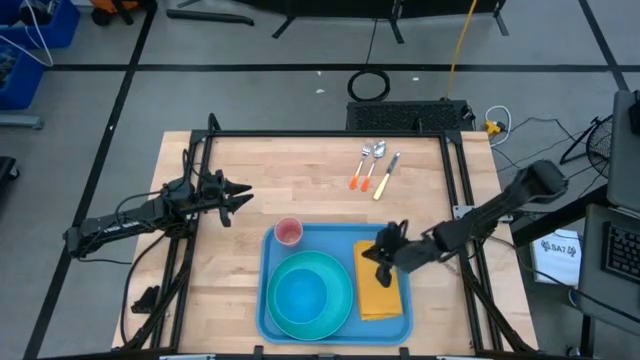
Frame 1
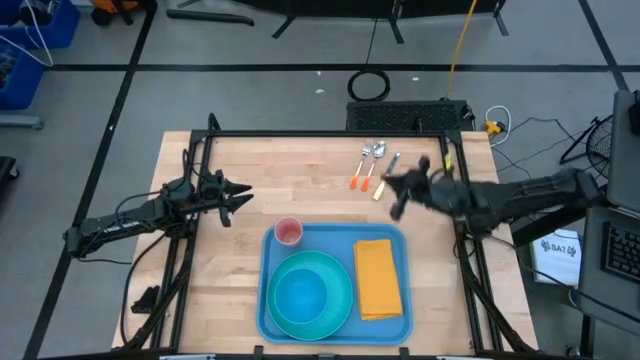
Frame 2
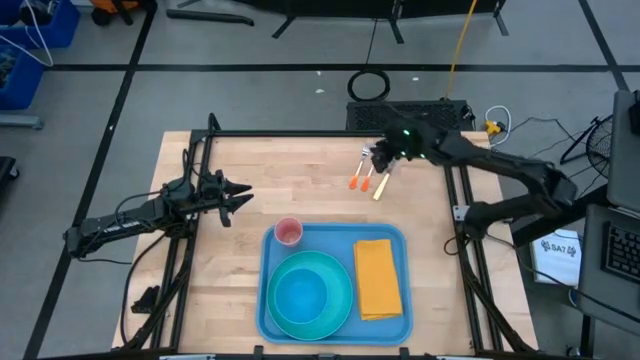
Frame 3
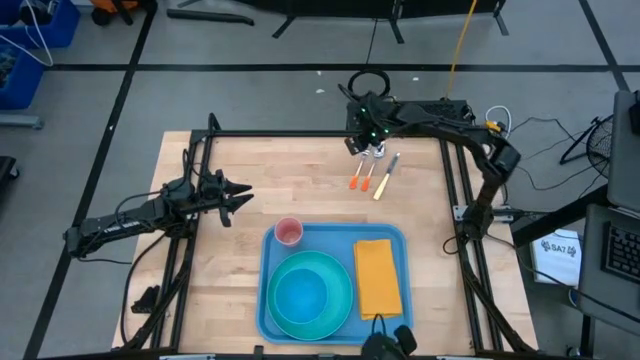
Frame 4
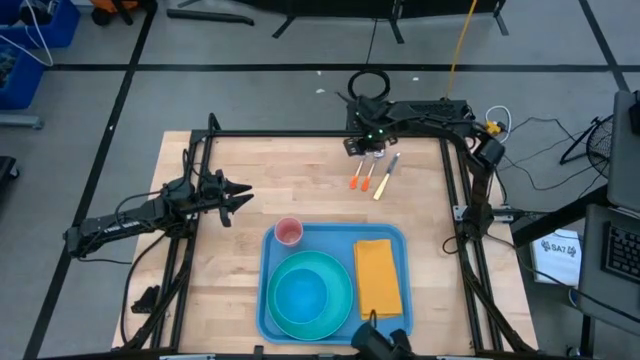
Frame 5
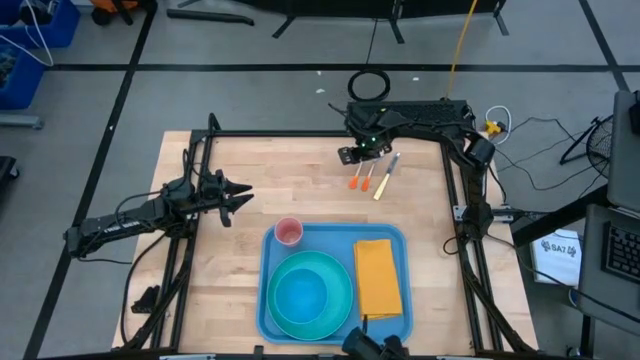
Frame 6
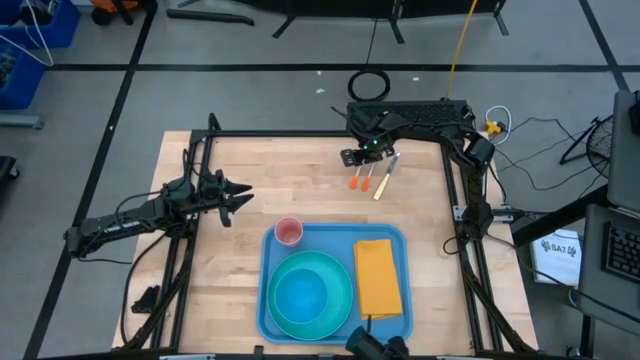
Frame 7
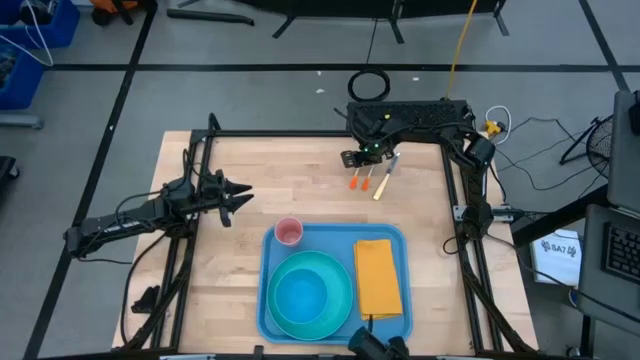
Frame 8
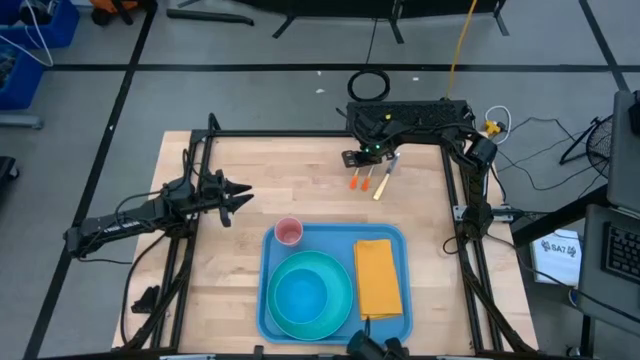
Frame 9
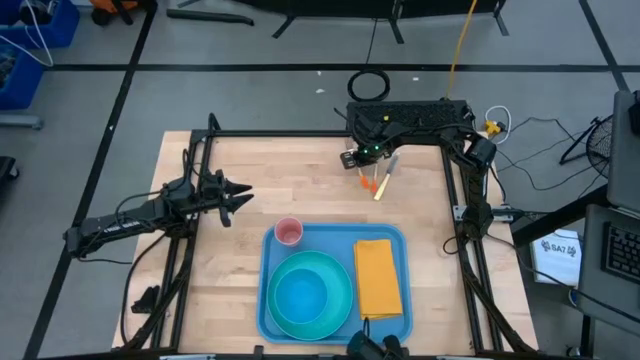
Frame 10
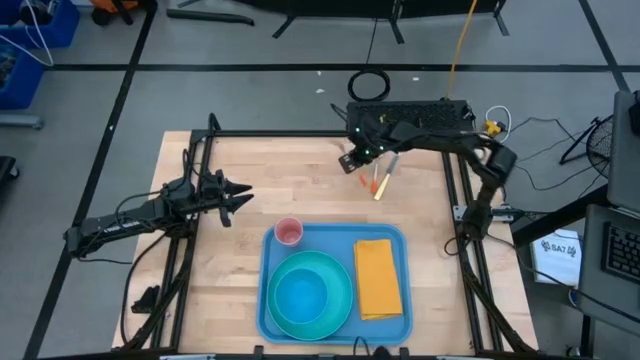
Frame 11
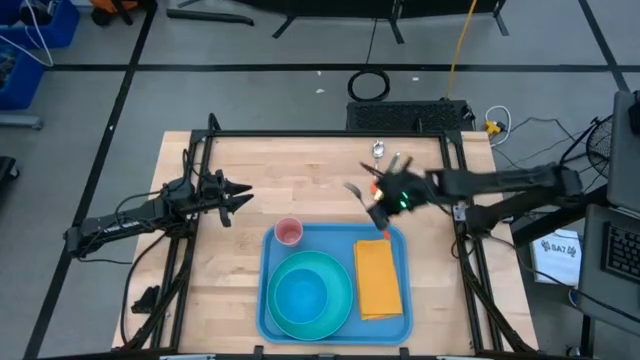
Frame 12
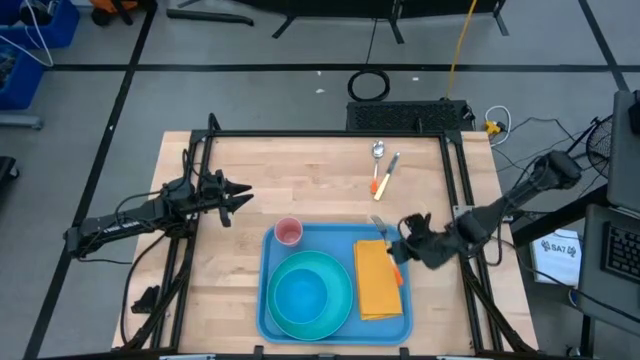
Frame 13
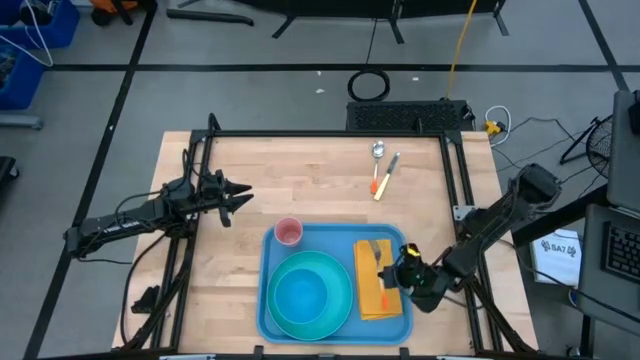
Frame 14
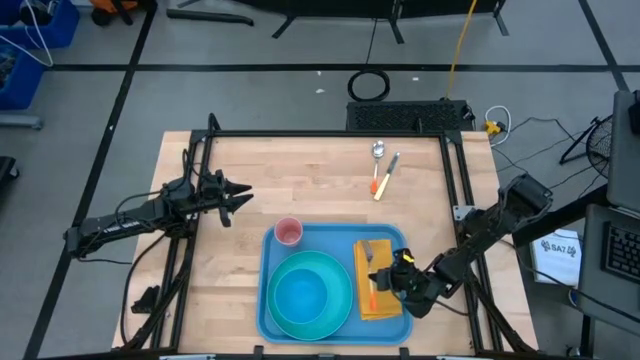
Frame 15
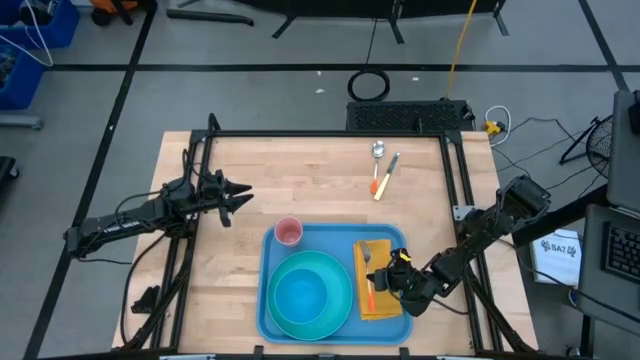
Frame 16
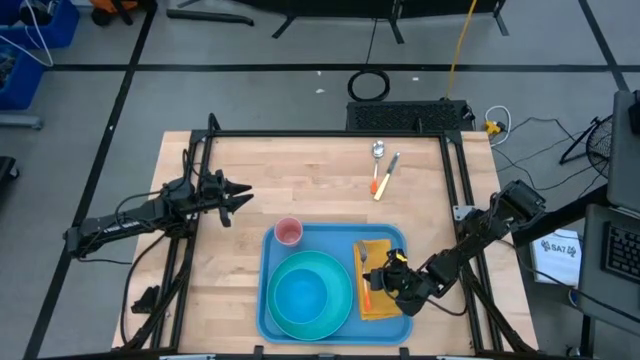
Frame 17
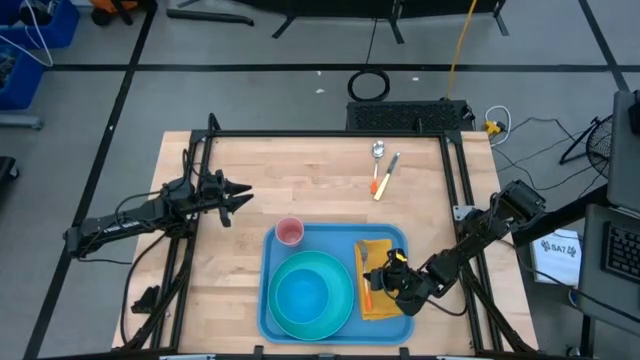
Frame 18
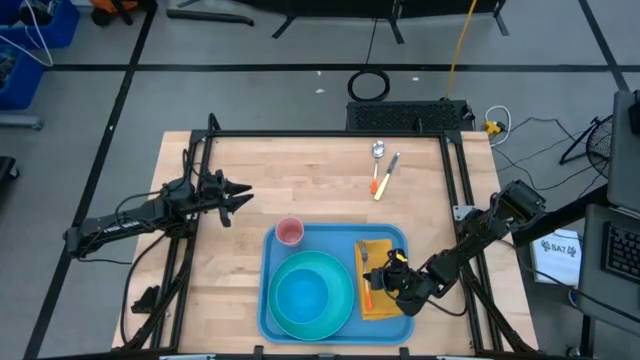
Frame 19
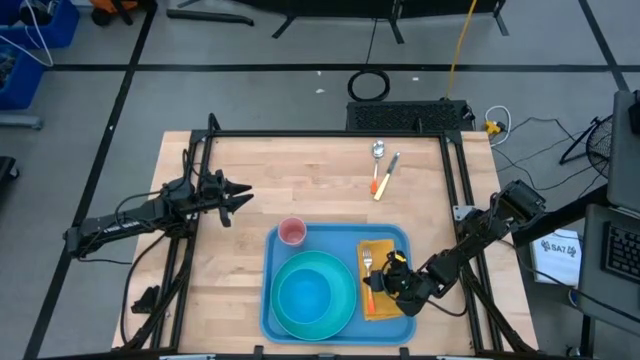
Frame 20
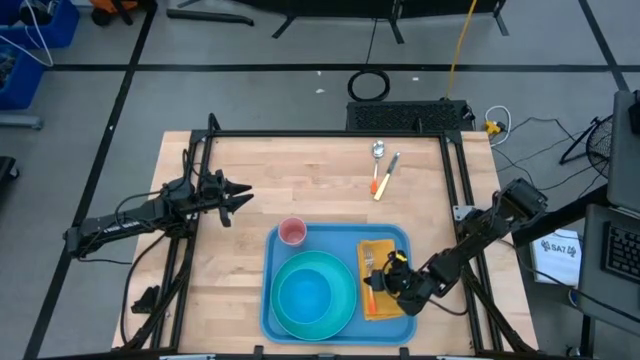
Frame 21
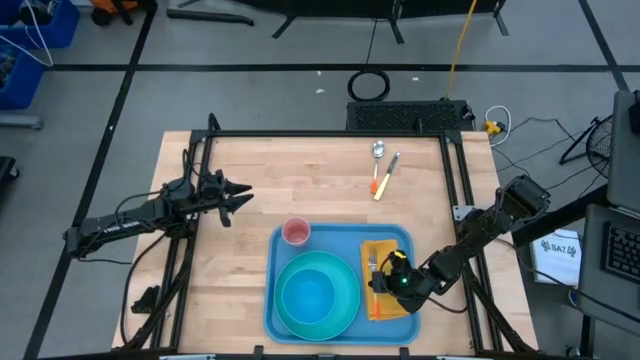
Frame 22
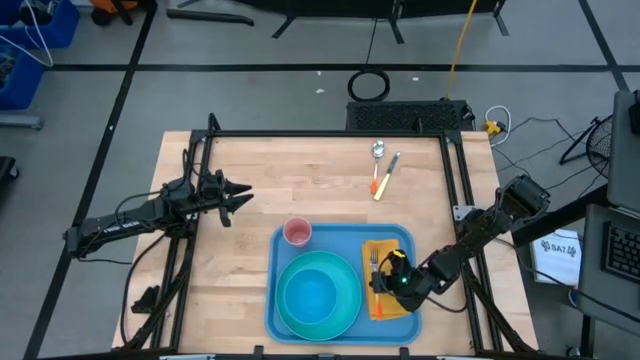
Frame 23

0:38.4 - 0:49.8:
Task: Set up tray
Put the orange fork on the yellow napkin

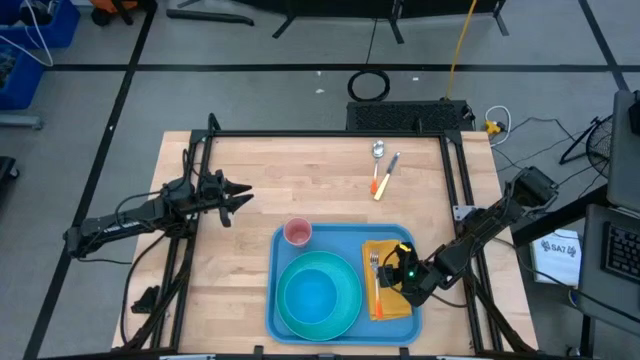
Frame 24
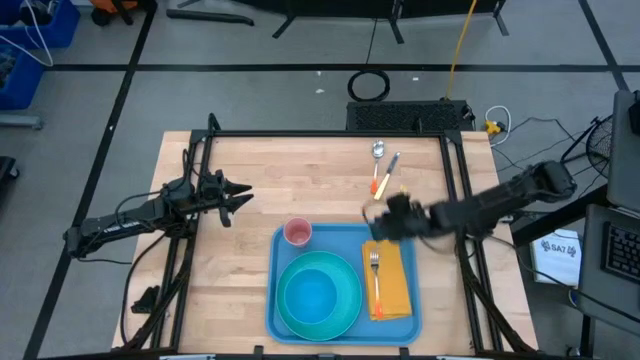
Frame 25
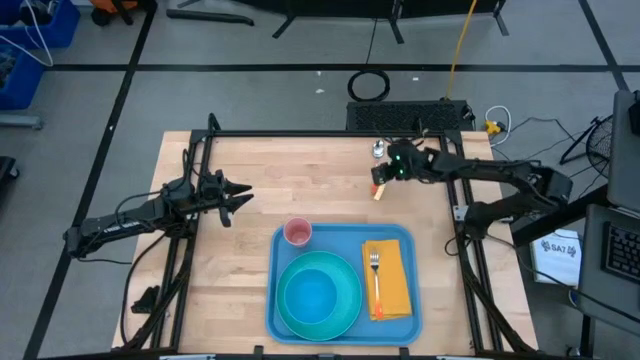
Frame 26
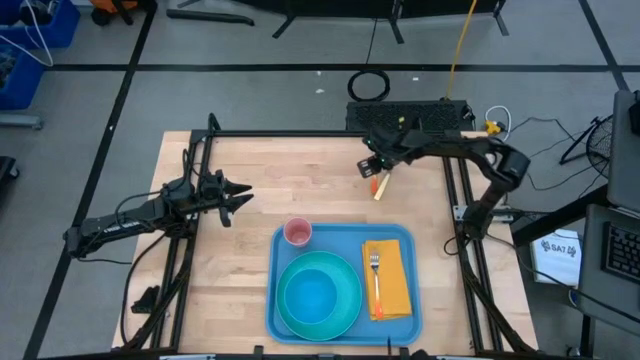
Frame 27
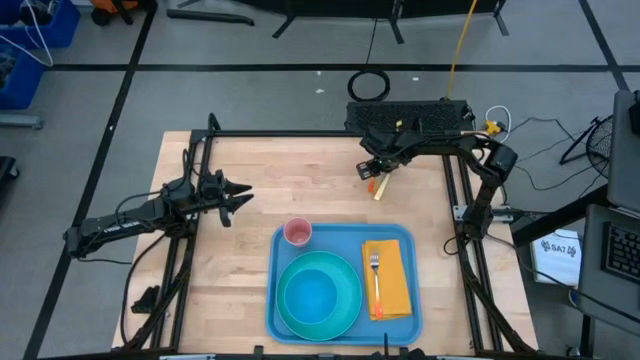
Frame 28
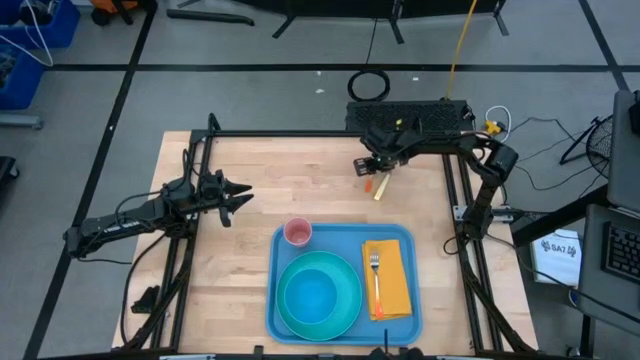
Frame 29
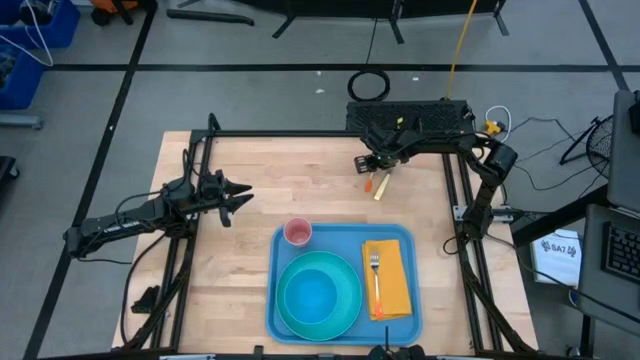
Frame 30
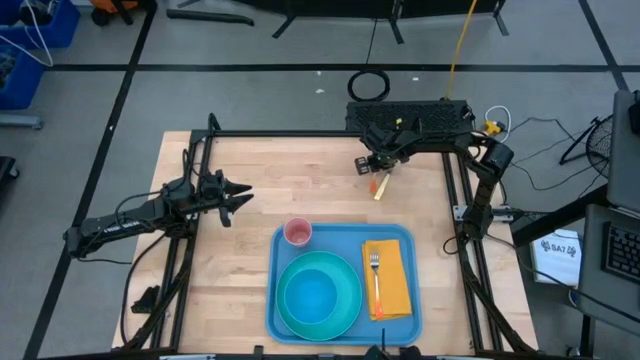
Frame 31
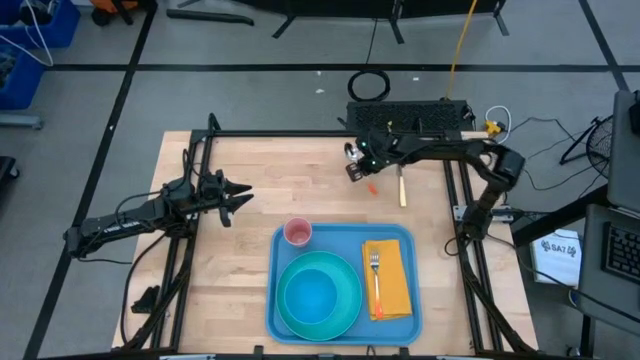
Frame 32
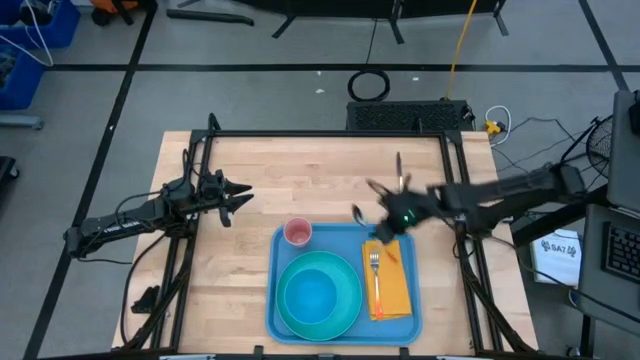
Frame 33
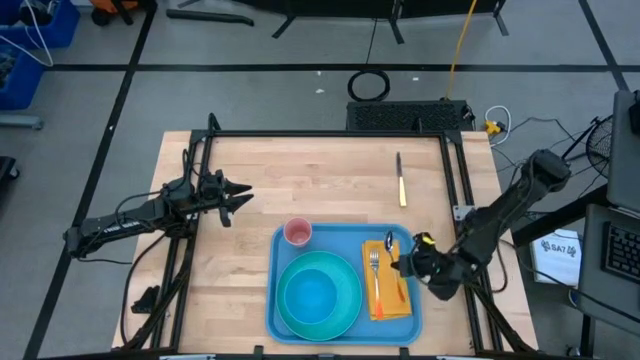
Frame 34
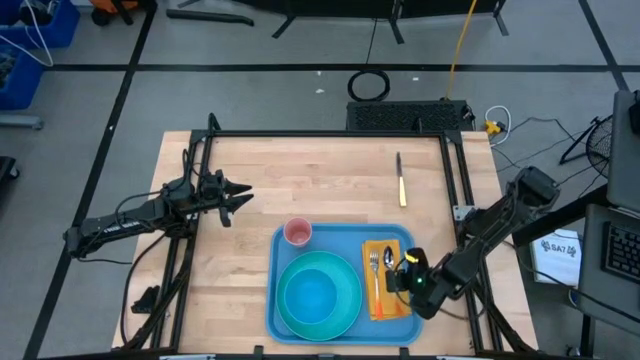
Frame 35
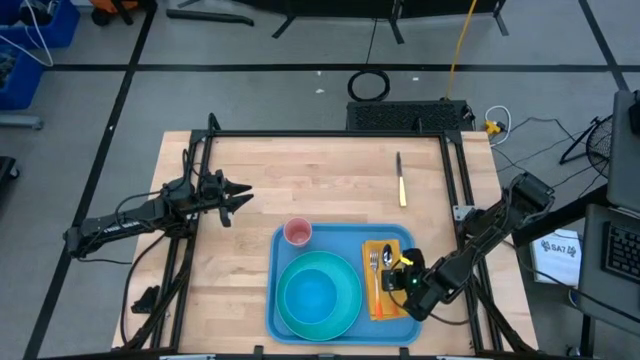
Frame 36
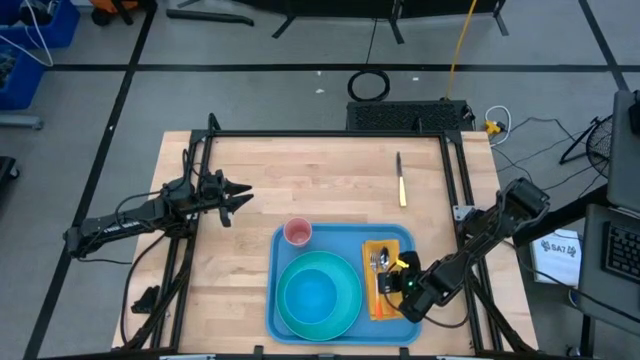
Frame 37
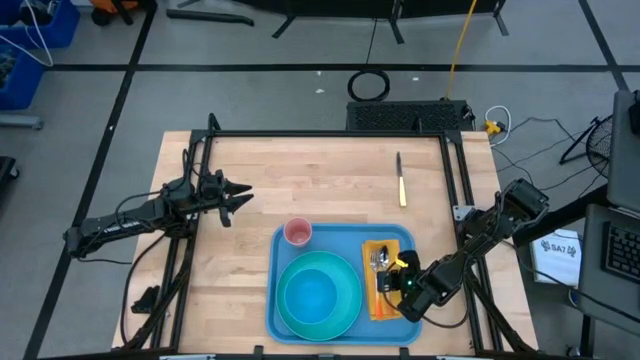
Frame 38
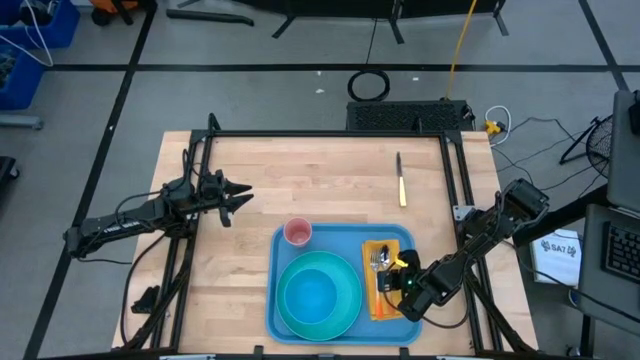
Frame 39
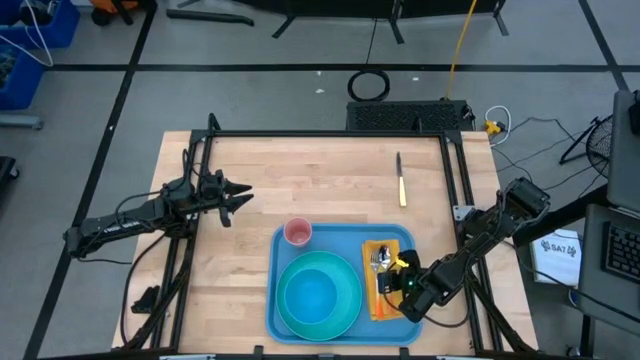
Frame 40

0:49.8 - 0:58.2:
Put the orange spoon on the yellow napkin

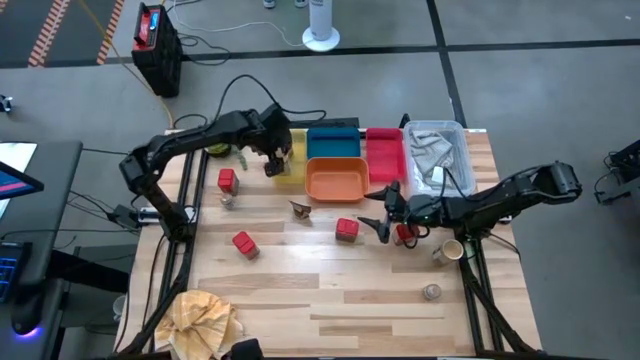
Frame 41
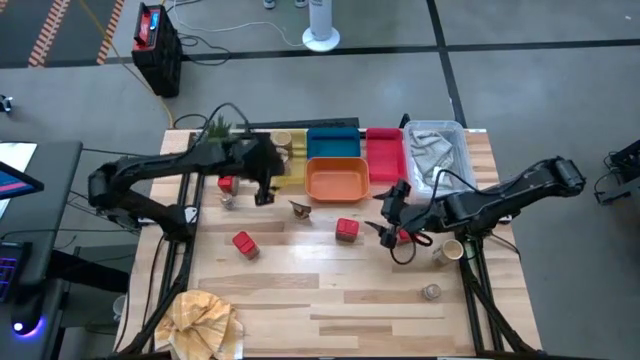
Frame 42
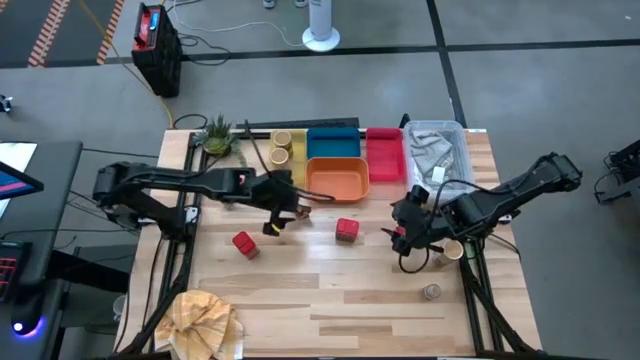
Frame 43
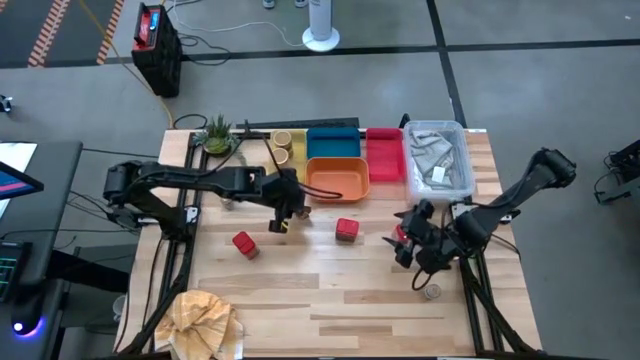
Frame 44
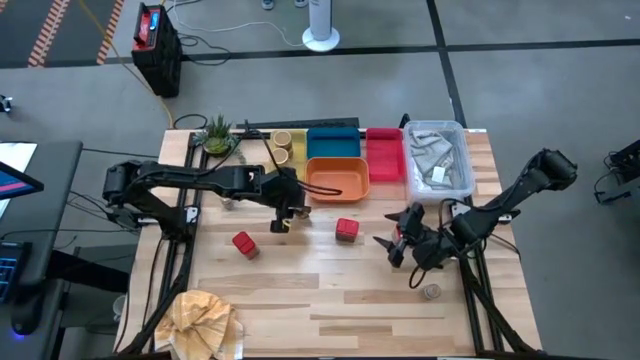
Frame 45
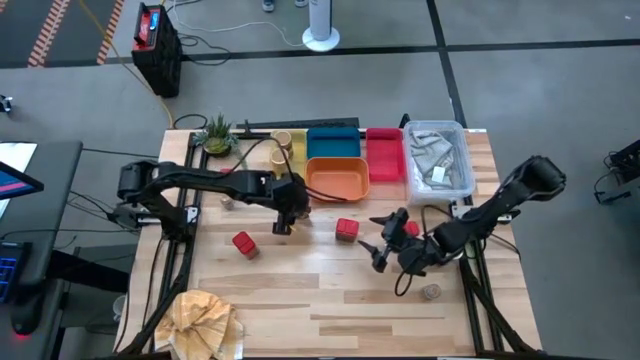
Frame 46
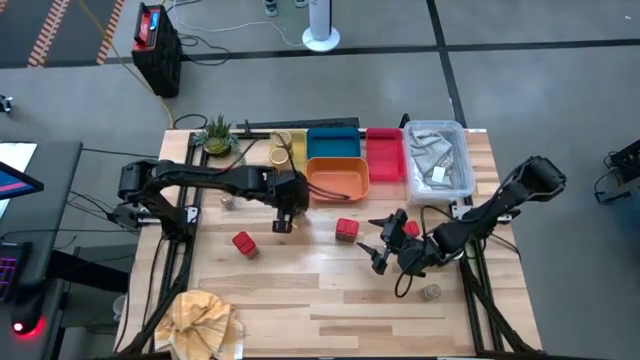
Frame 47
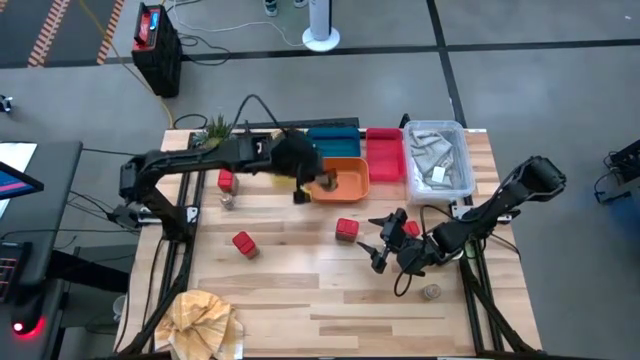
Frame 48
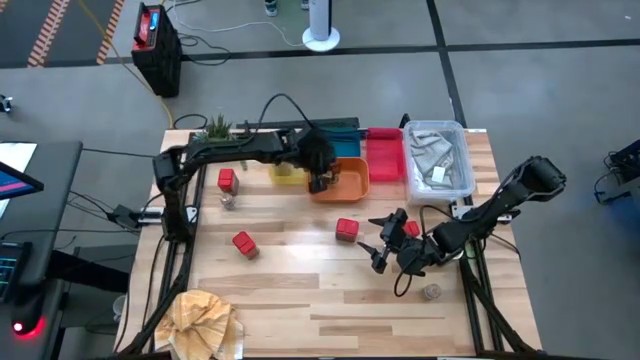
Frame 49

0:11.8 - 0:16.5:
Task: Sort spices by type
Put the orange seasoning pack into the orange bin
